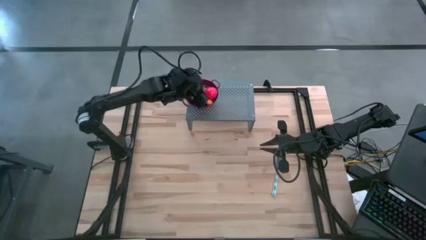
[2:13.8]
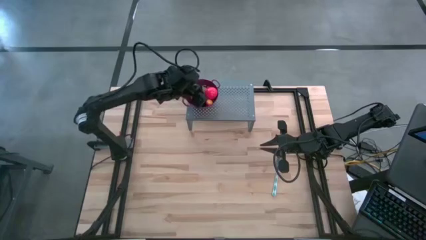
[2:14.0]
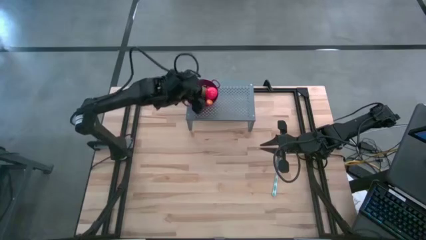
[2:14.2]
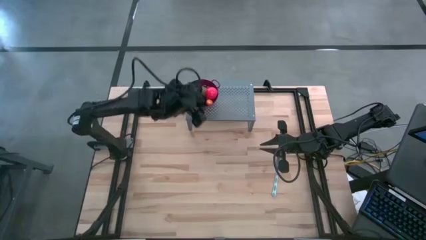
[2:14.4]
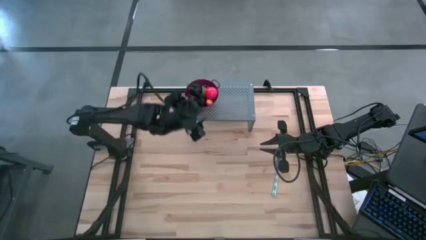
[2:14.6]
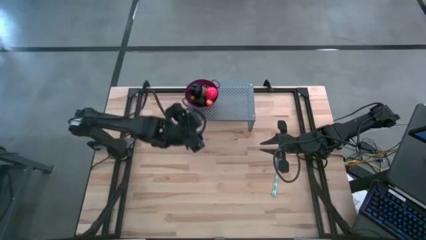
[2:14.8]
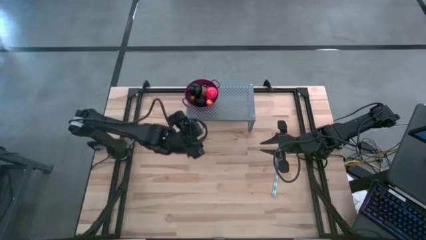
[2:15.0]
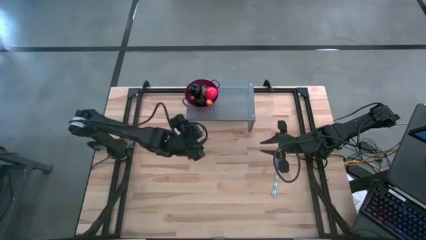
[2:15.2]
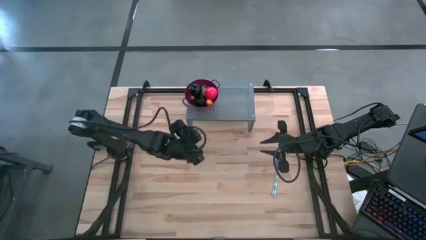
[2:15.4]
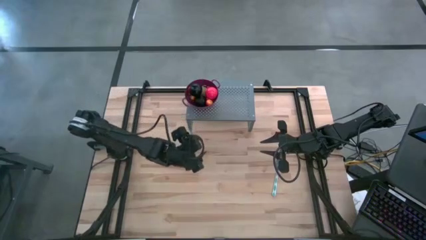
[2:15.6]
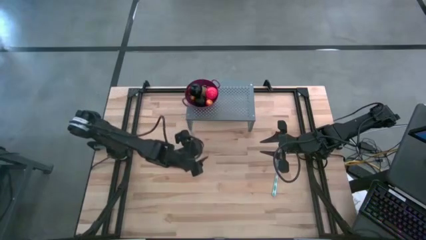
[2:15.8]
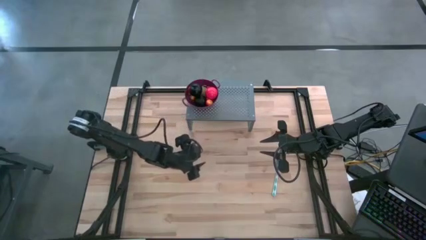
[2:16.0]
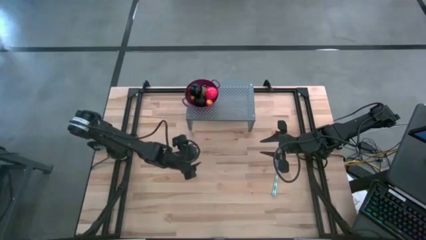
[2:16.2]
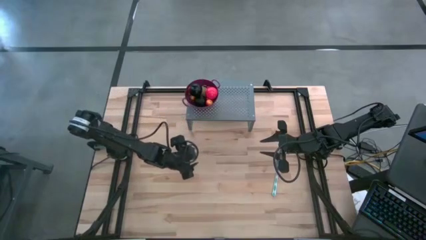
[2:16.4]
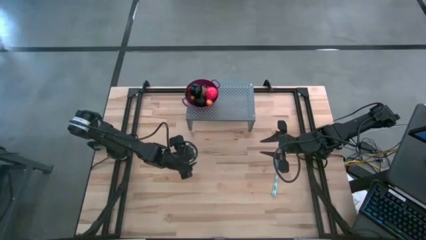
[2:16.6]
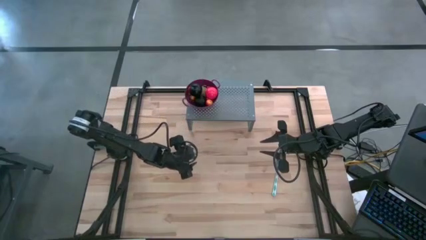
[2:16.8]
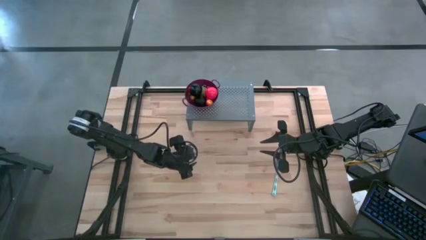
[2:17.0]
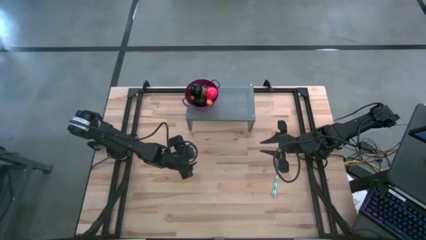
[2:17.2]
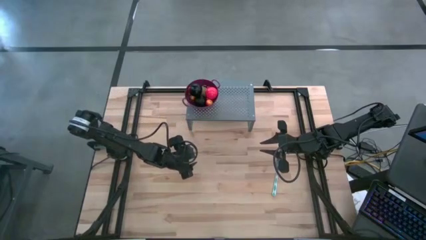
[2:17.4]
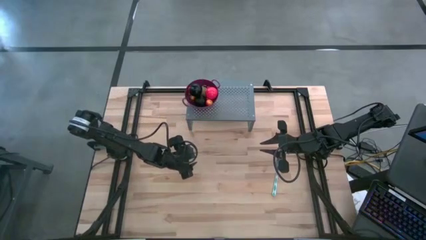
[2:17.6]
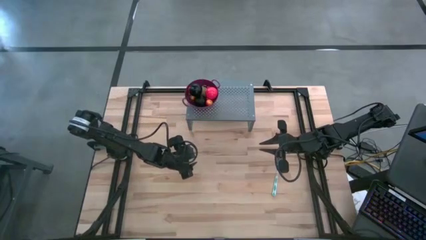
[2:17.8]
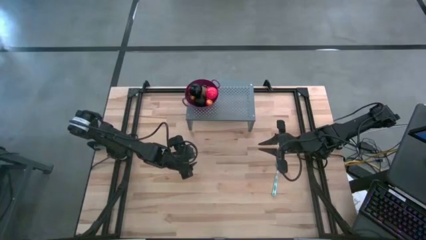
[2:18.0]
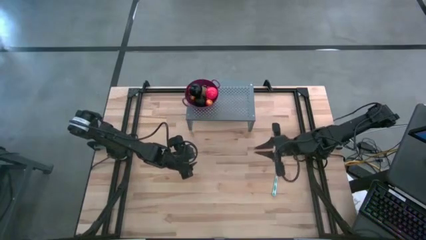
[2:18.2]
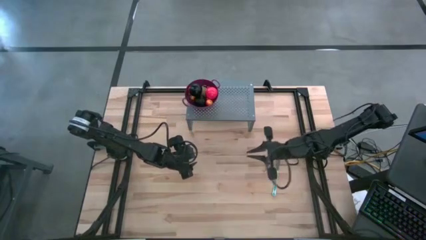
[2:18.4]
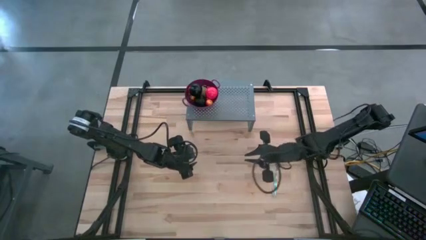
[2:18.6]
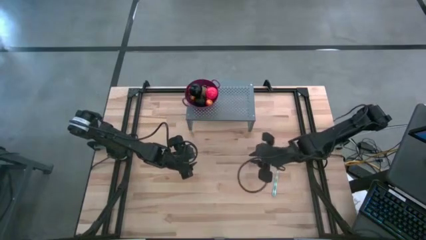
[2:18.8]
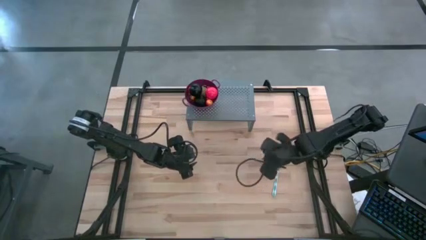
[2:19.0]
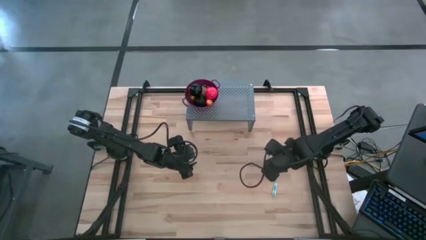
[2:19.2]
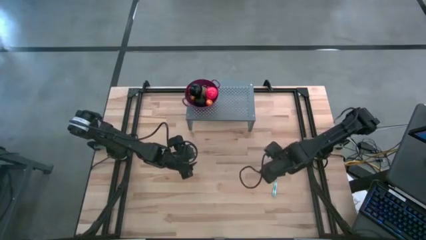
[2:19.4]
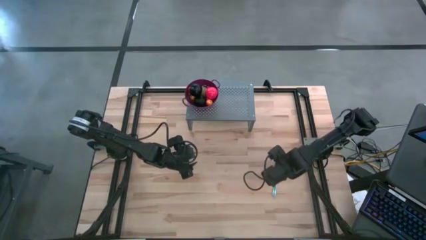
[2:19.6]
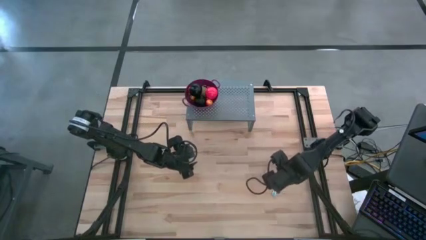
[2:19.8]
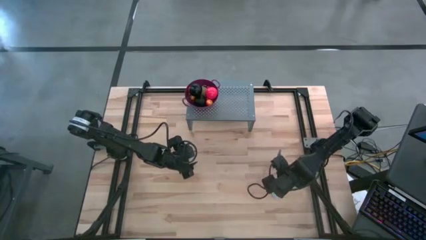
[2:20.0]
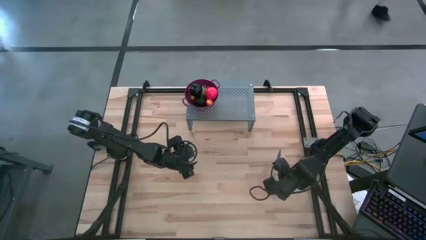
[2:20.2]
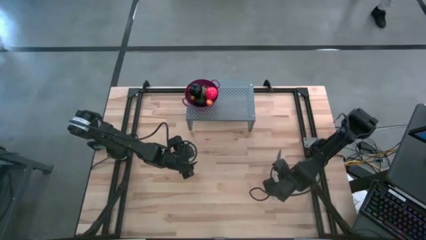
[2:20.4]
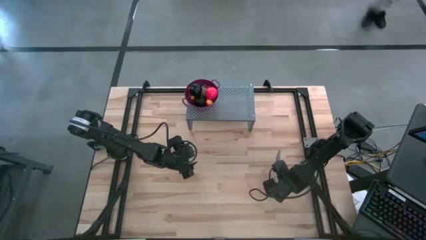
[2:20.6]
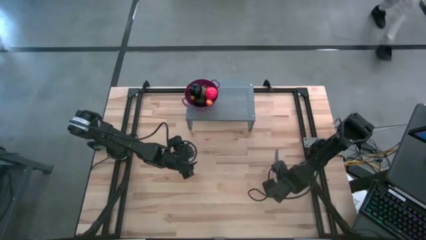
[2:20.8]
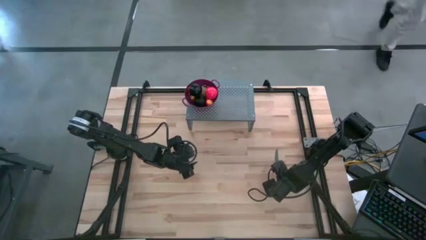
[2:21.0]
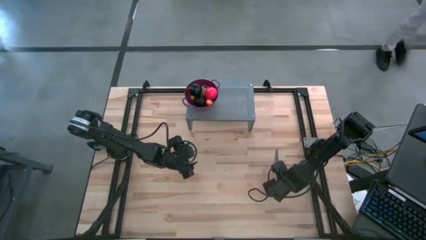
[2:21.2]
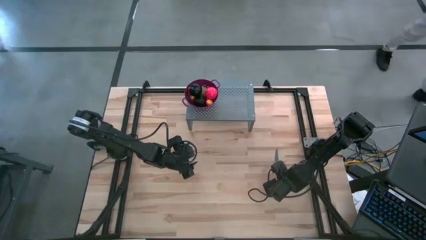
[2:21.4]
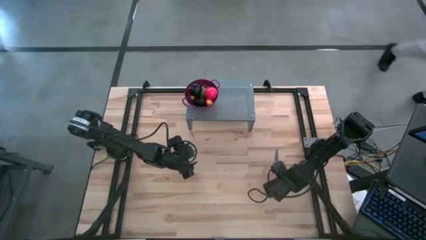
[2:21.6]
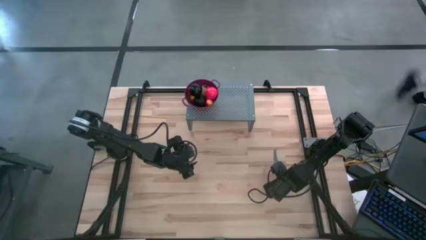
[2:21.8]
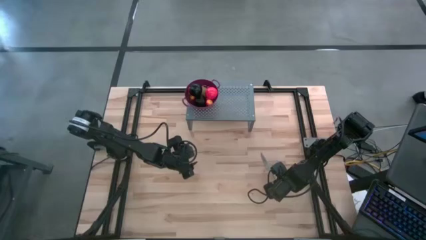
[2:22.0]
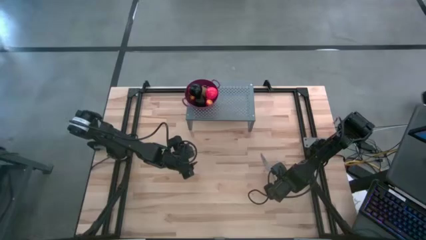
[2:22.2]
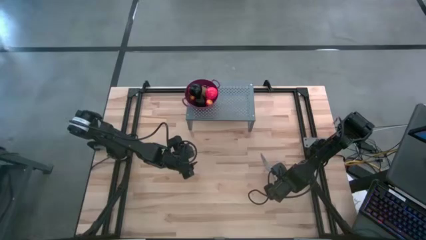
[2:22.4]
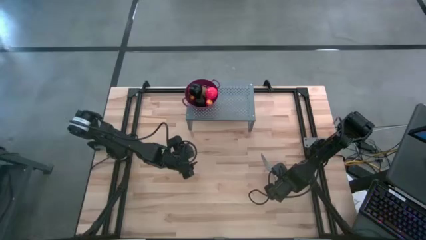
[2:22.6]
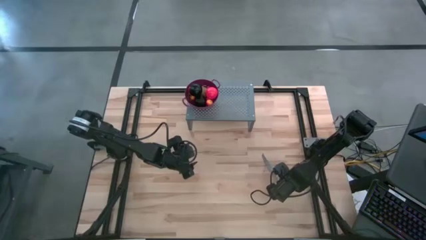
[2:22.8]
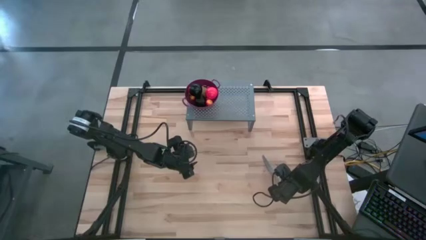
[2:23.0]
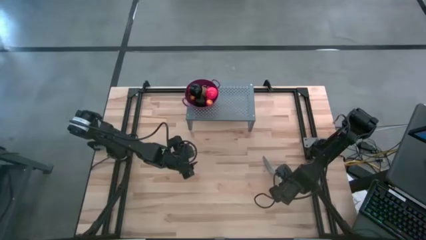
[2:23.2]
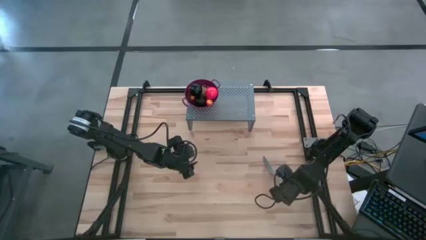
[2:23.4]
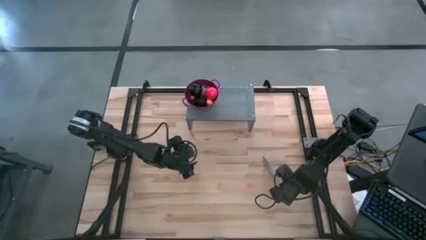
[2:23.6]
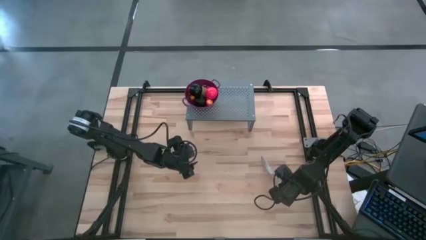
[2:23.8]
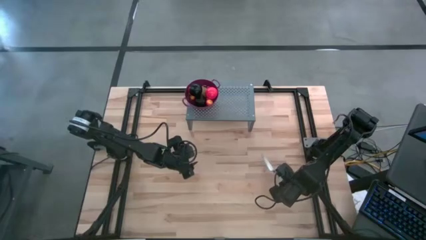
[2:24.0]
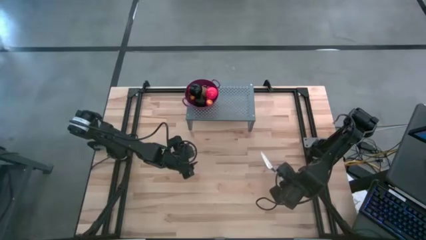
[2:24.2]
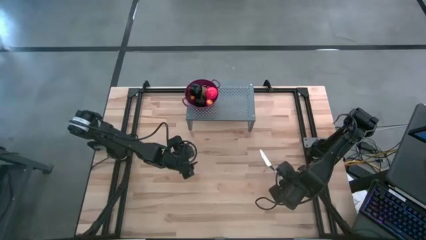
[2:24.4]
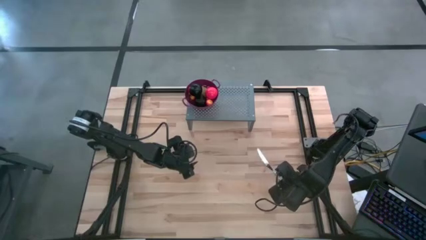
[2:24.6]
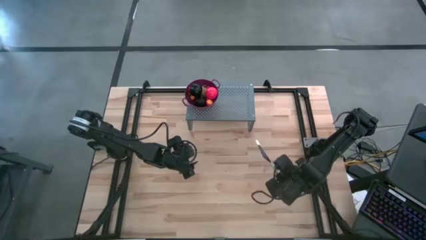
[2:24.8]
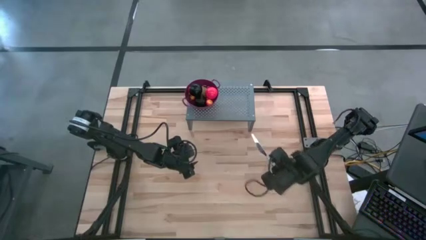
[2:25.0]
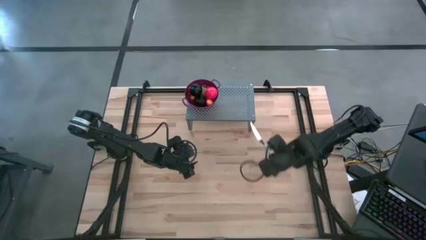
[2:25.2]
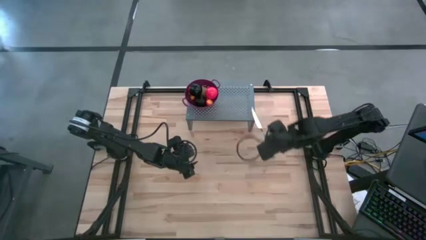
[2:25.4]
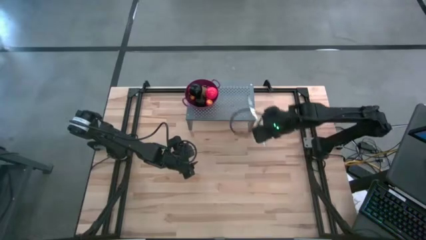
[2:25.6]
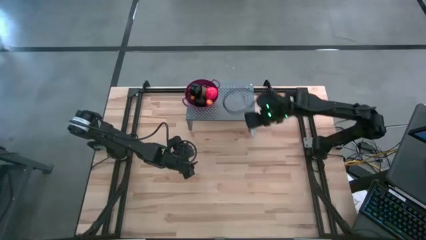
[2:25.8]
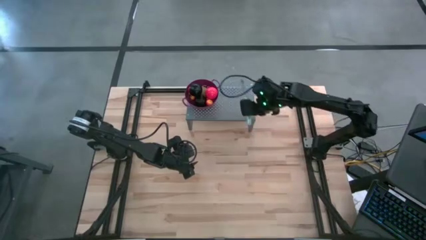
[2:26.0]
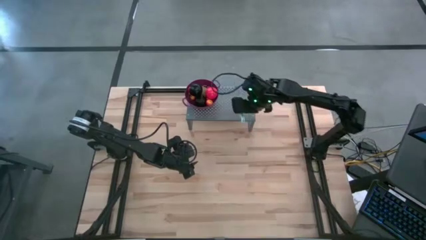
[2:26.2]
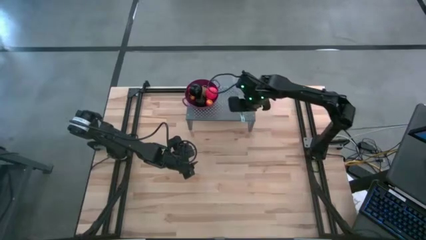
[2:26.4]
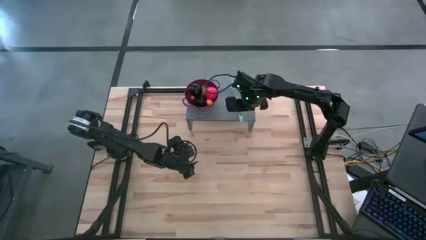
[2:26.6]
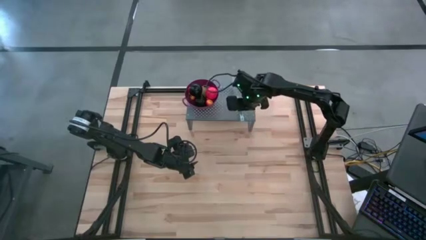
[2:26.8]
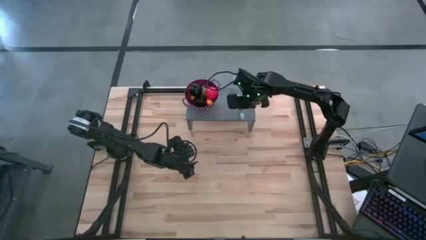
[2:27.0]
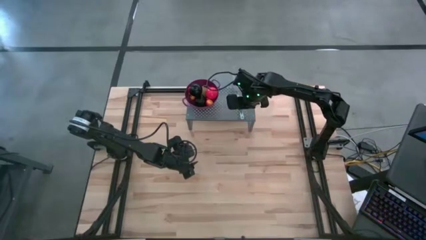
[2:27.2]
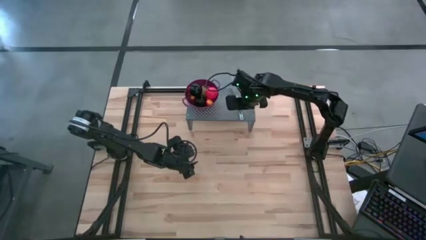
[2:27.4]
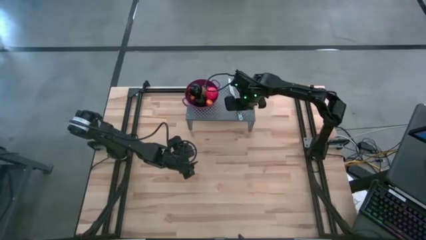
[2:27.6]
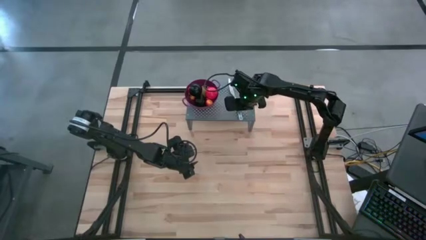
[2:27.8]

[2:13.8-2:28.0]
Task: Pick & Place Fruit
Put the silver knife on the shelf

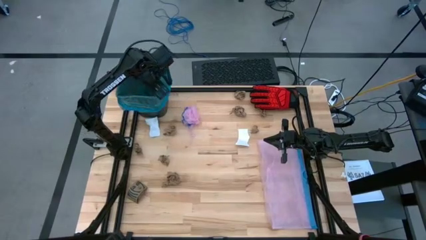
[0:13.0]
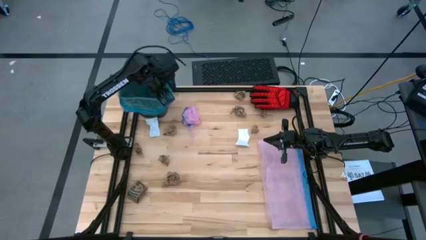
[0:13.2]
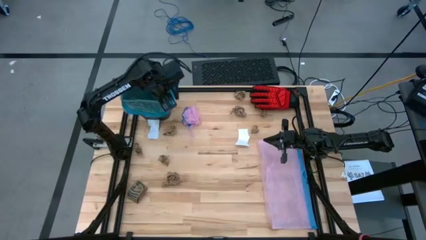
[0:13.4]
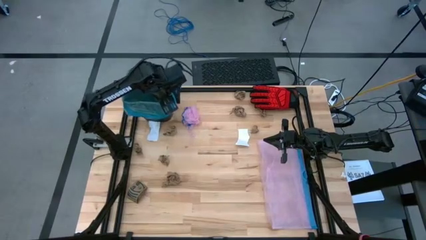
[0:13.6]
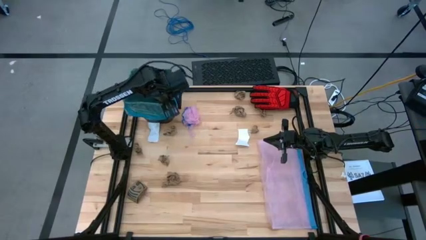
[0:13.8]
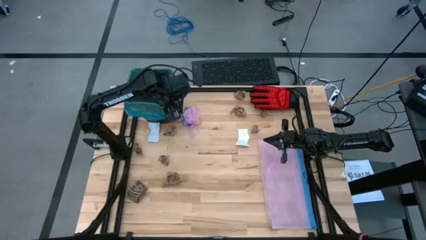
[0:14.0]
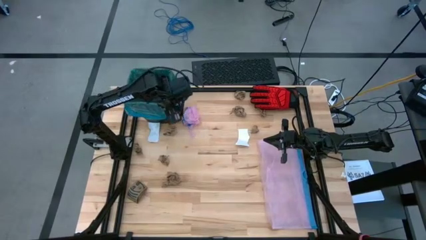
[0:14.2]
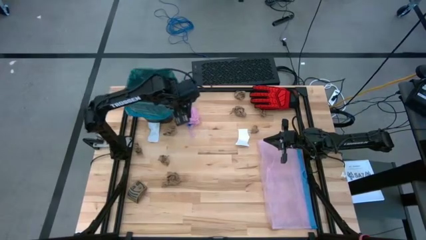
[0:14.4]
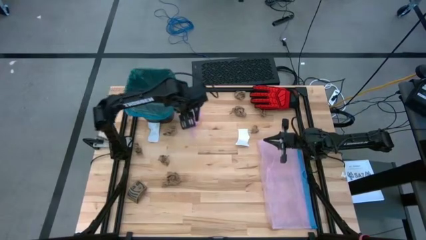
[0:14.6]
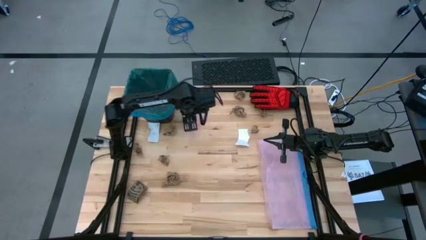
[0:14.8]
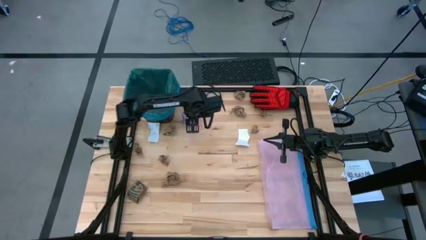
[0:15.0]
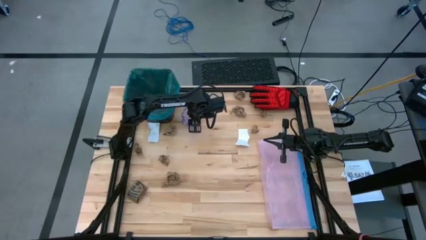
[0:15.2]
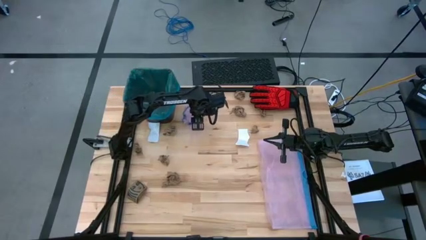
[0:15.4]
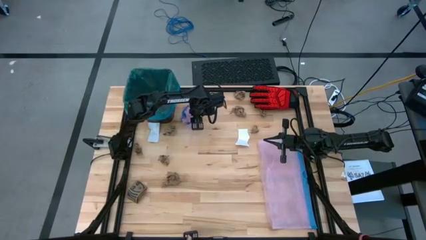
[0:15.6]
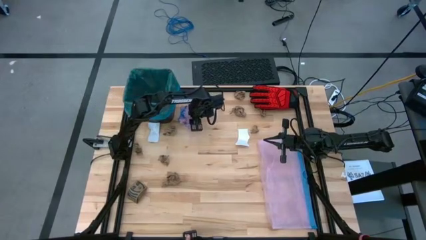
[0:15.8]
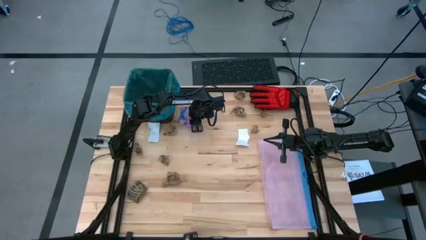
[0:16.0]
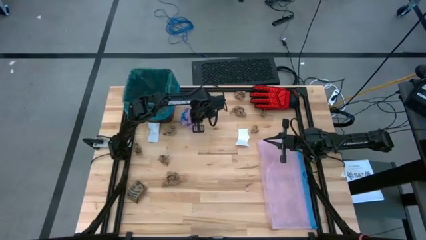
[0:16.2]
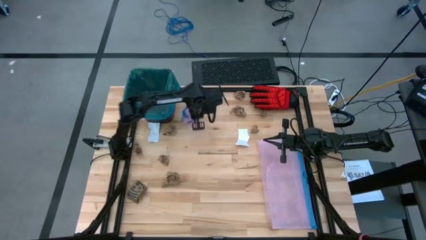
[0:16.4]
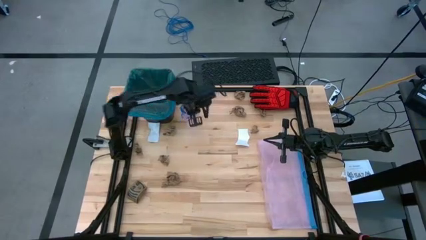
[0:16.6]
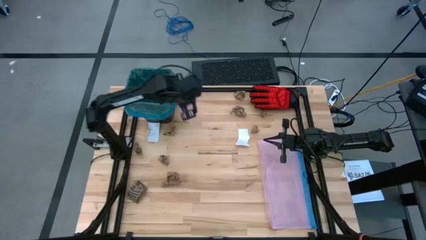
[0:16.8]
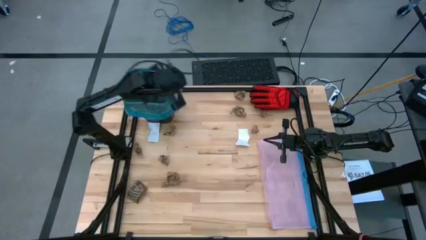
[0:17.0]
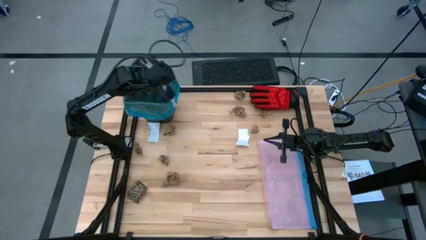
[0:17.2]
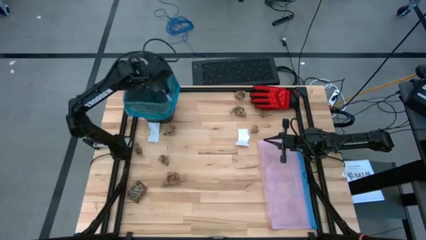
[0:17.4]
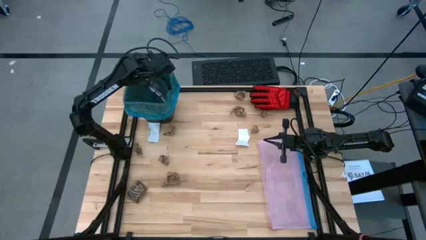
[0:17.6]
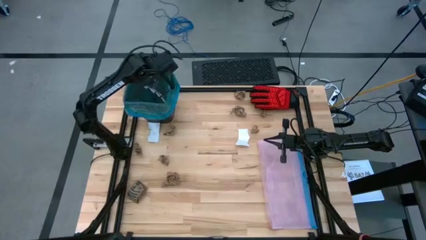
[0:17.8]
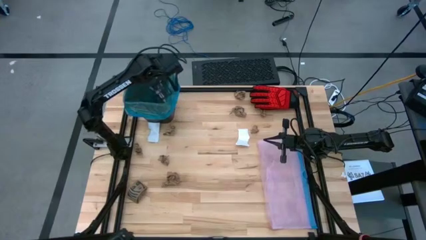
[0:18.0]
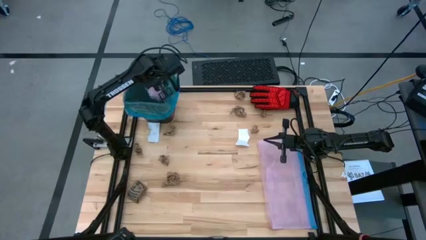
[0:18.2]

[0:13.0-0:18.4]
Task: place trash/remove bag and relplace
Put the pink plastic bag into the black trash bin
